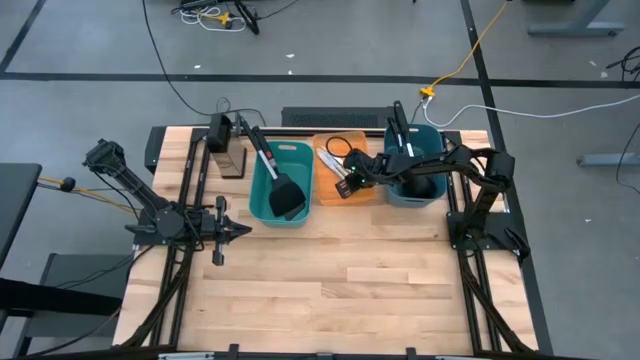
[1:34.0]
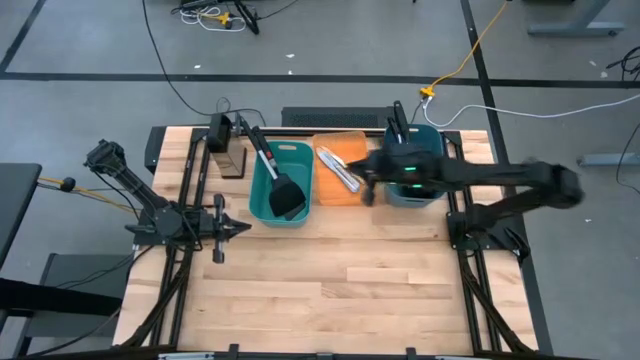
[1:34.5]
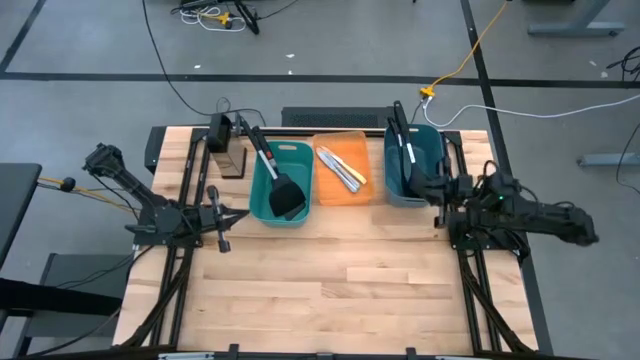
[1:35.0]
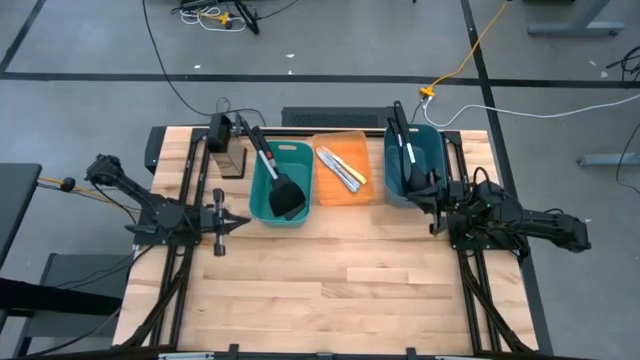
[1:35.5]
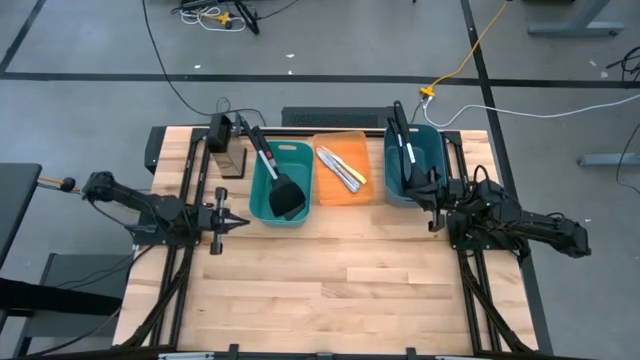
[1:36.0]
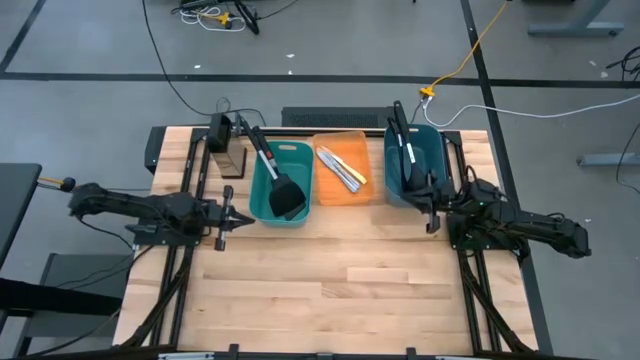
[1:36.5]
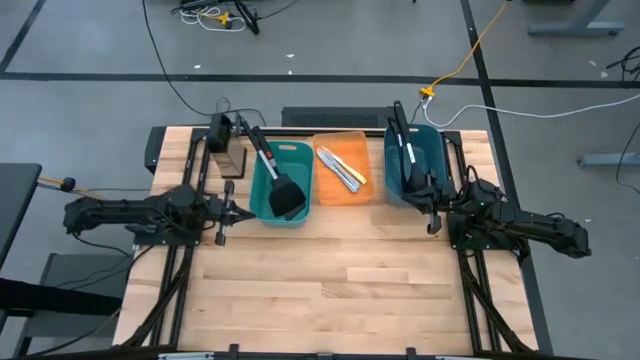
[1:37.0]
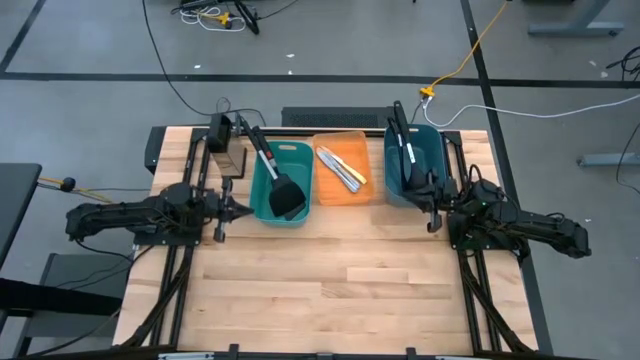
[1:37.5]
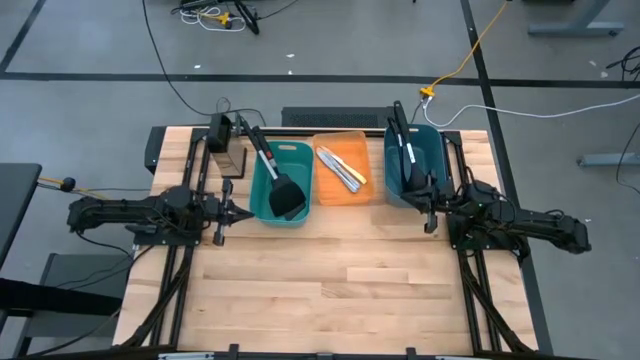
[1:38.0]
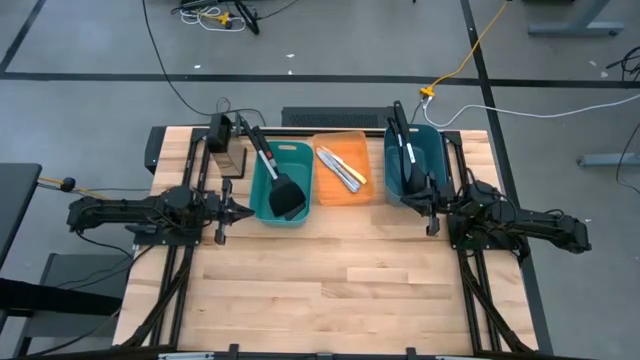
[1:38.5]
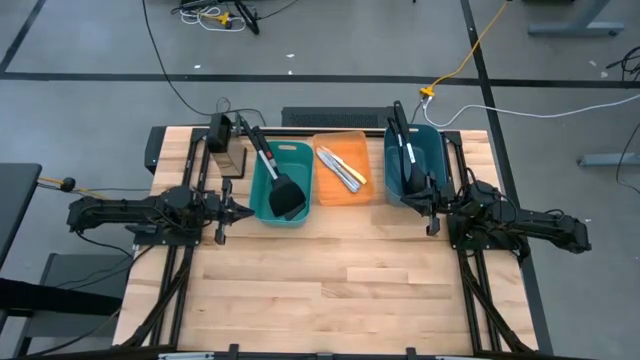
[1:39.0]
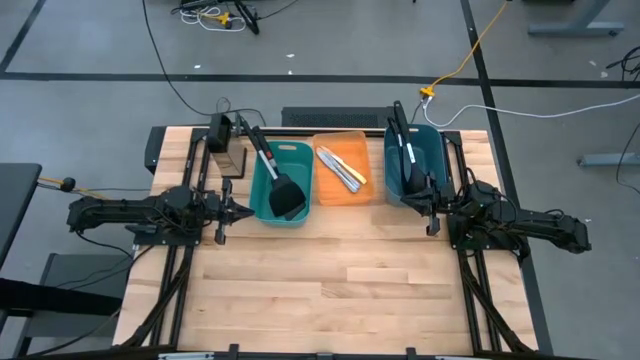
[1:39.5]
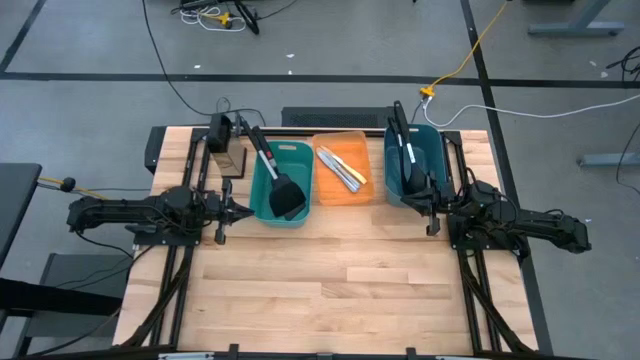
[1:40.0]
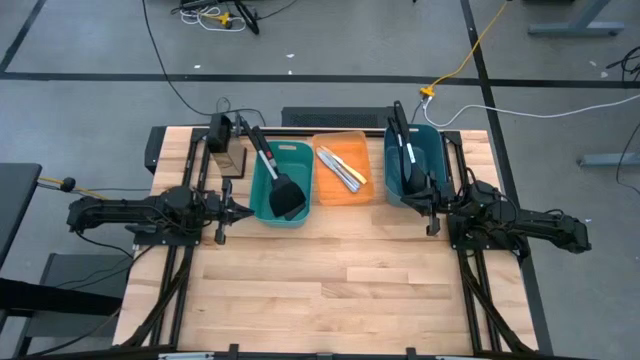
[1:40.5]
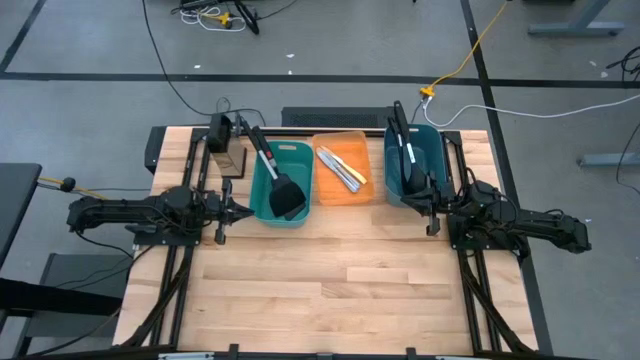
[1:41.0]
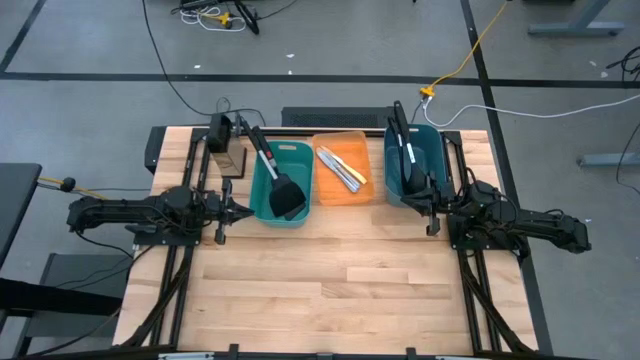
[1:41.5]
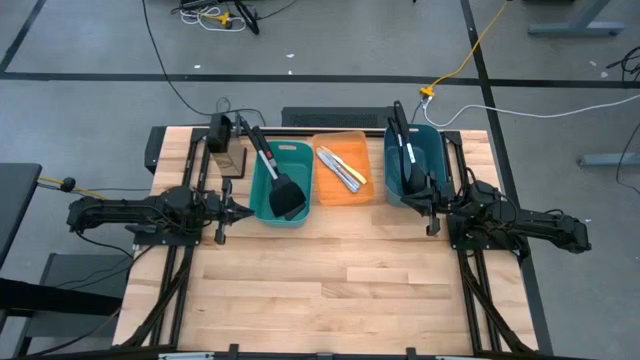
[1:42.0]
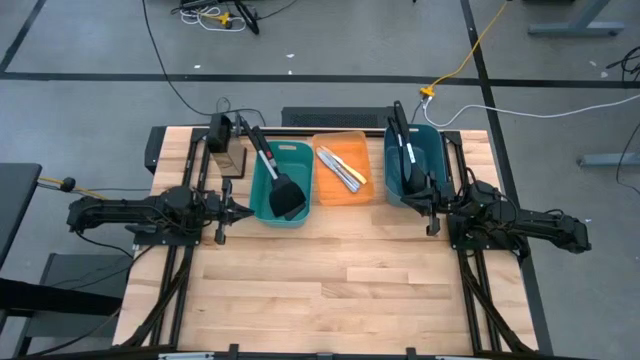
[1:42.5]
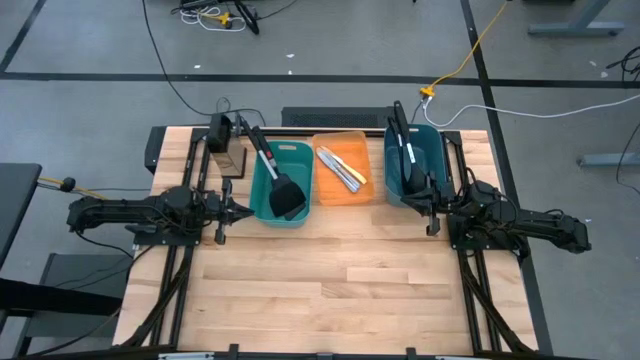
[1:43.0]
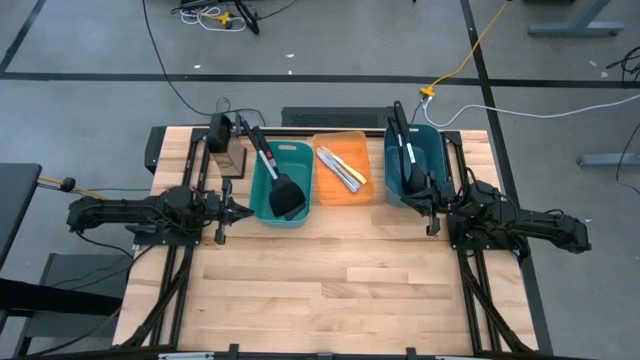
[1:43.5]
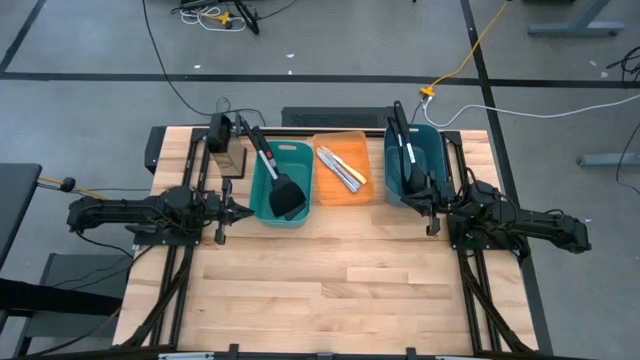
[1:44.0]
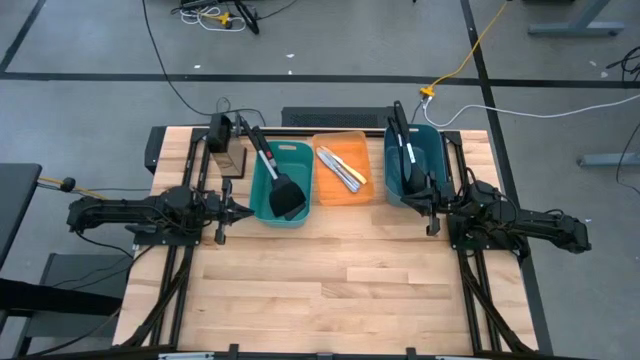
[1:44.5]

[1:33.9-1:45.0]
Task: Pick & Place Kitchen Items
Return to Home Position

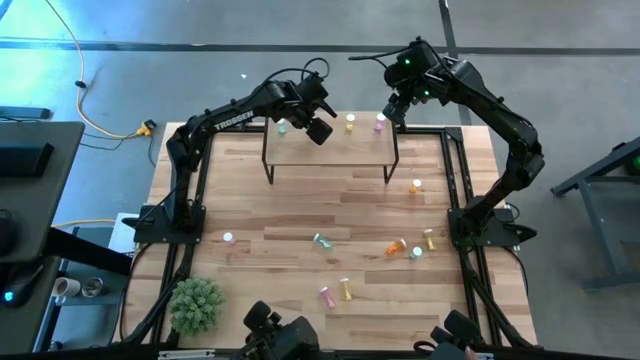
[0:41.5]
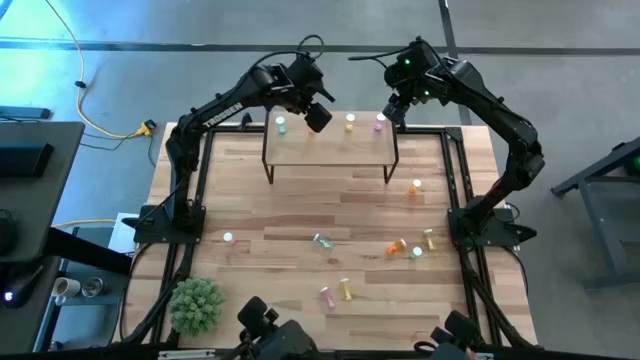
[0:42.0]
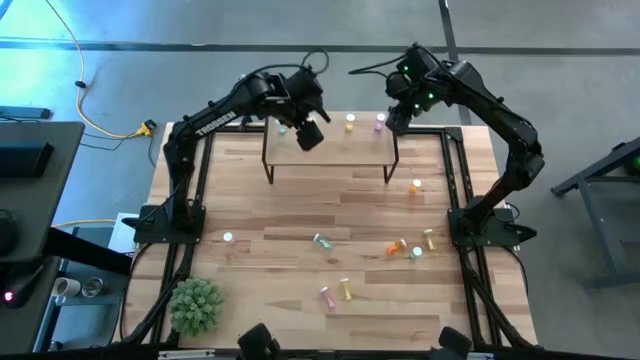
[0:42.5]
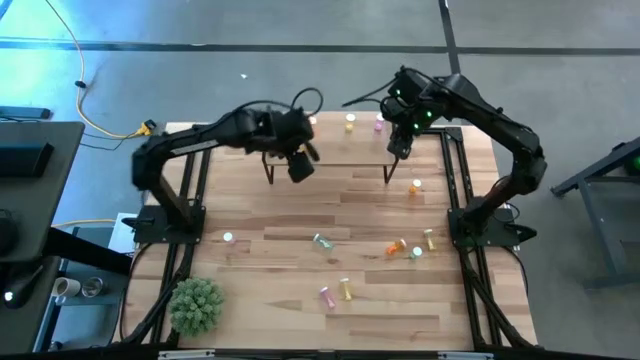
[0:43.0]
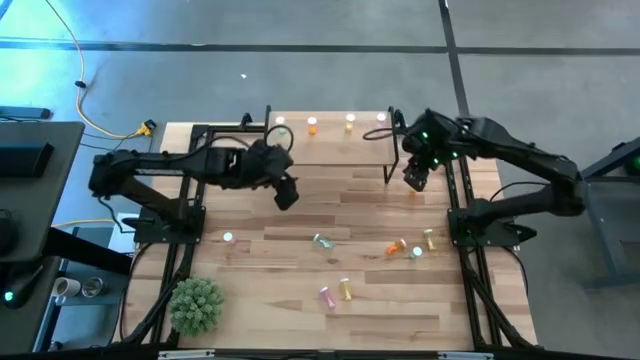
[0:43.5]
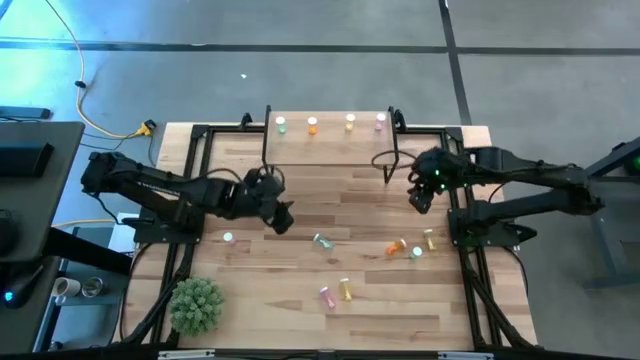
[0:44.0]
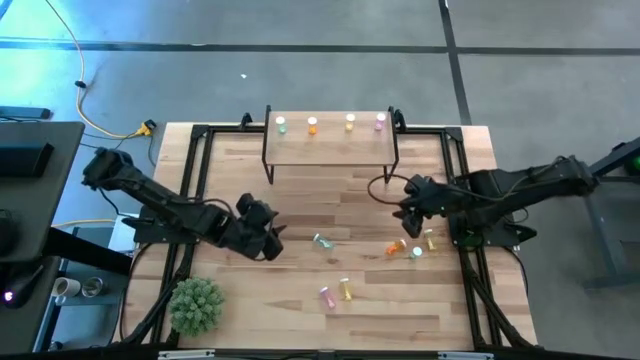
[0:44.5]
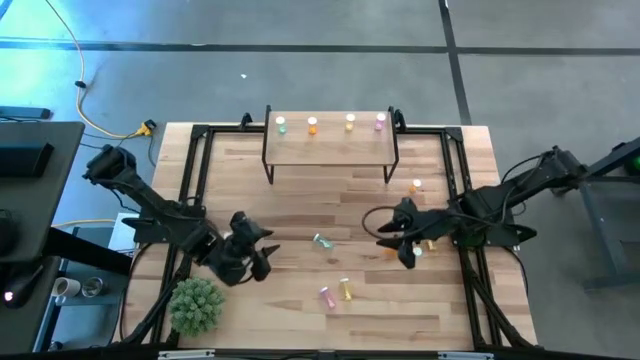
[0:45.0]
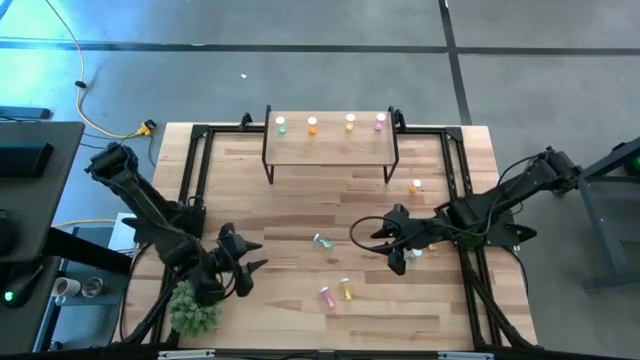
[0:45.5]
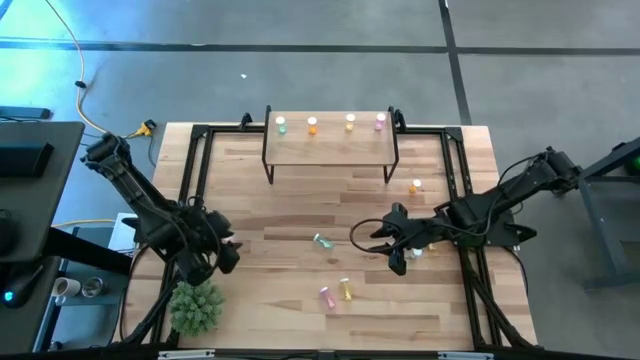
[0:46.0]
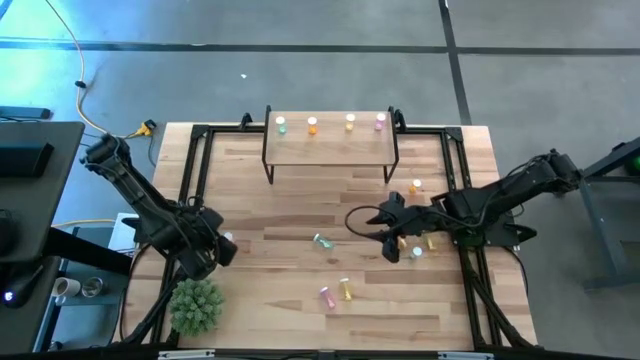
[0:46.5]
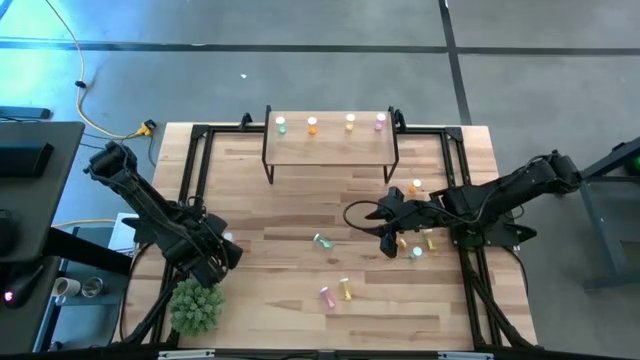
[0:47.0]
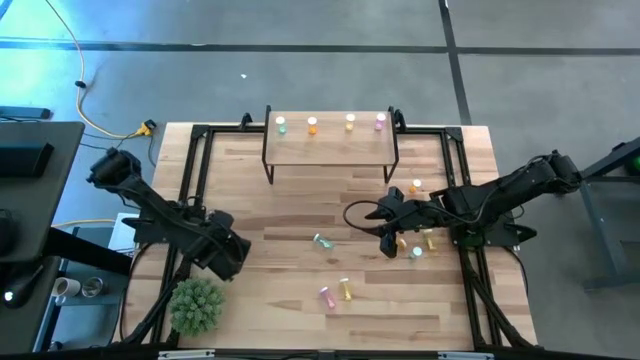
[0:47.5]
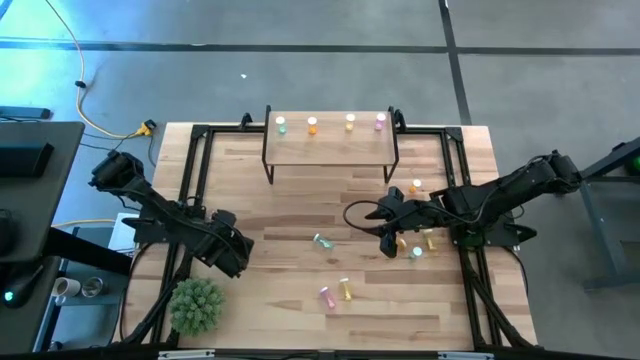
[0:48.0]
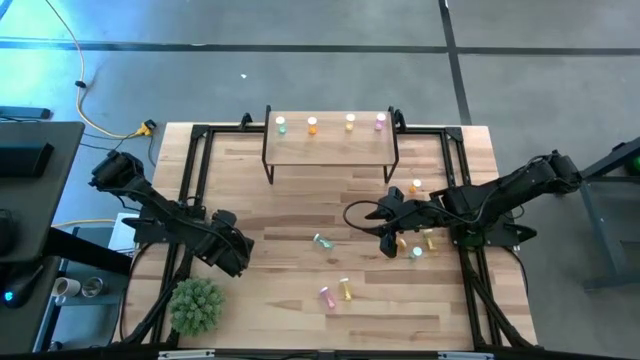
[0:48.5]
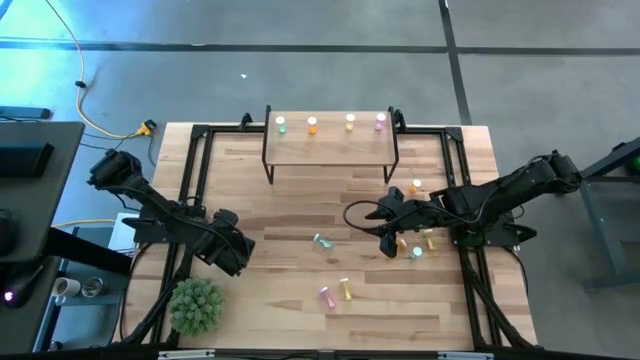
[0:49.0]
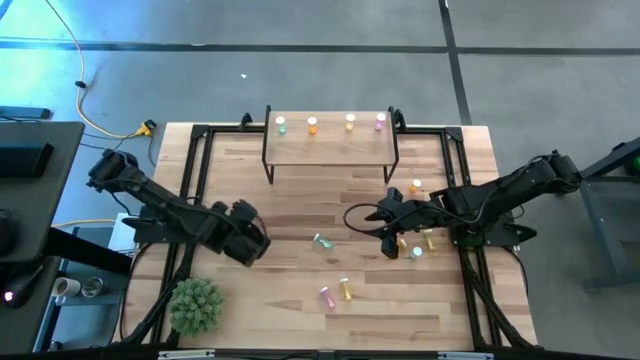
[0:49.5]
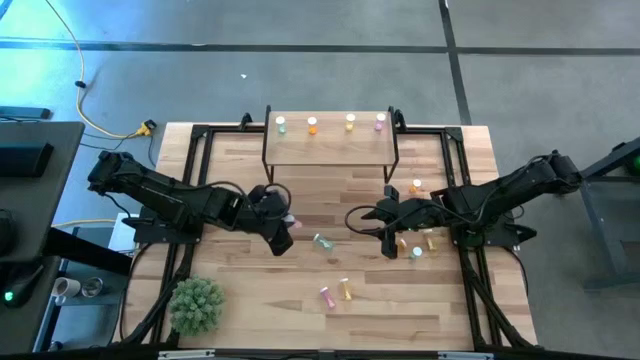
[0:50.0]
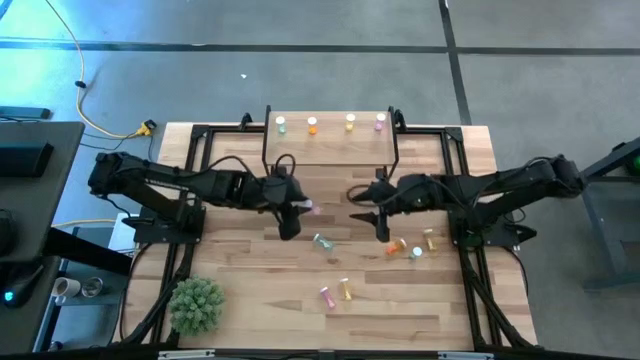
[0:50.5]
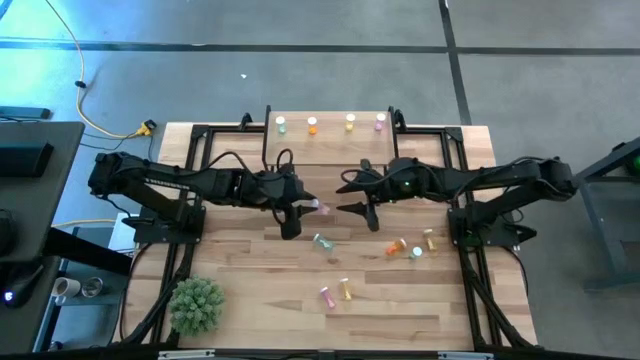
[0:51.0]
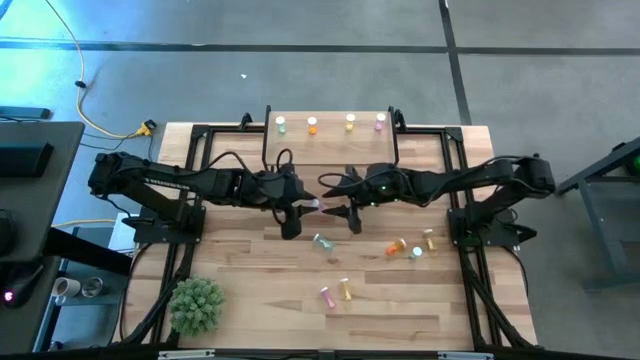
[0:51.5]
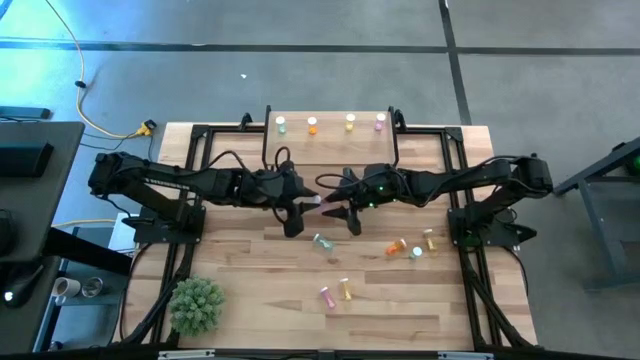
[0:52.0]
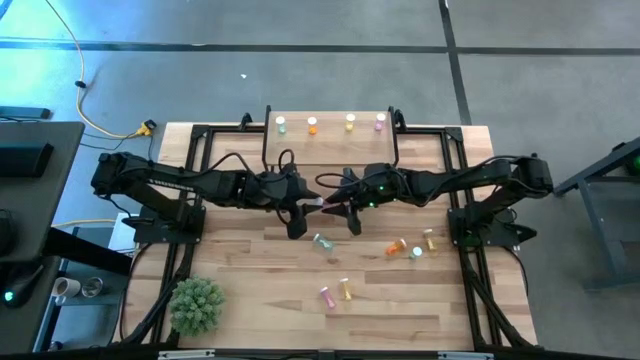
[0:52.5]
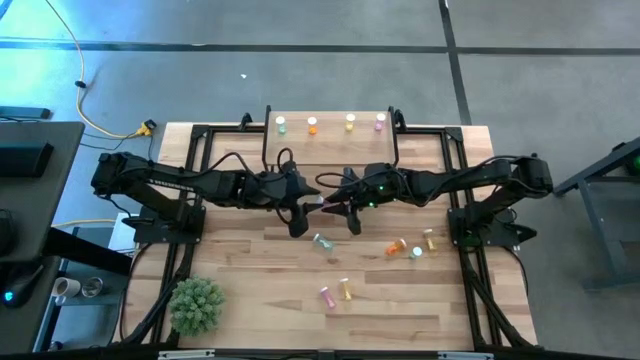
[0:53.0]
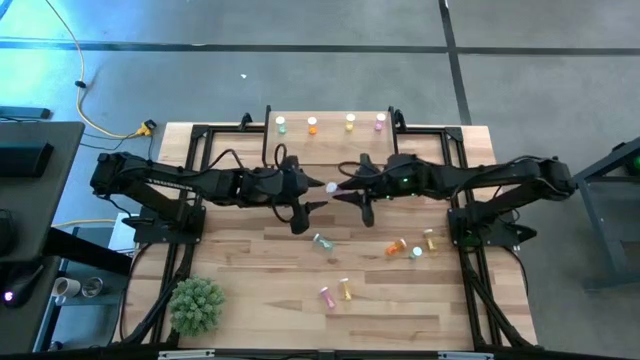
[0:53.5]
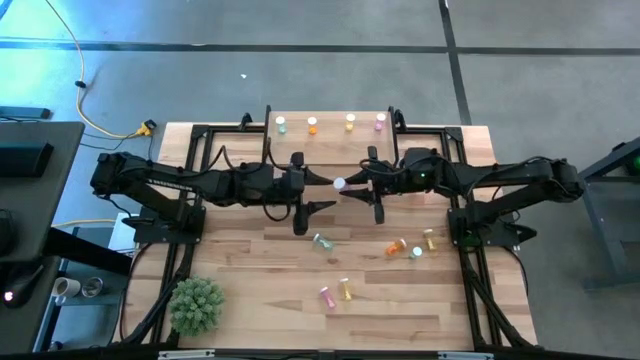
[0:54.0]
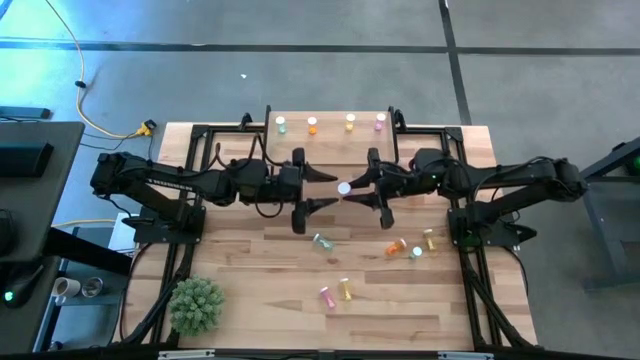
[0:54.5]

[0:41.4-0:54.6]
Task: Pick and place medicine bottles onto shelf by color
Put the top violet pill bottle on the shelf aligned with the other violet pill bottle
